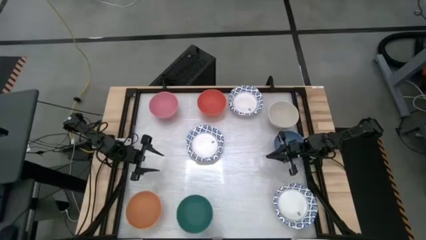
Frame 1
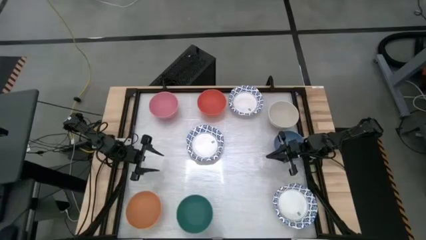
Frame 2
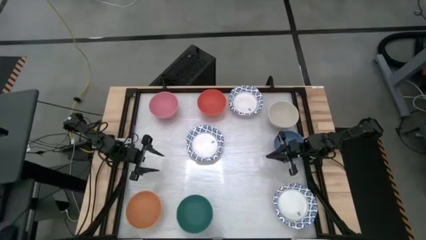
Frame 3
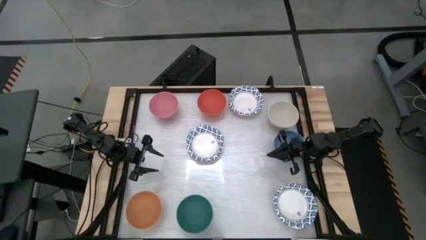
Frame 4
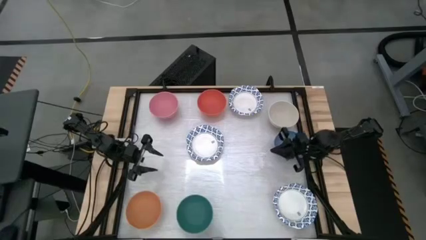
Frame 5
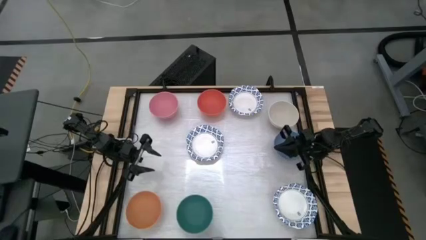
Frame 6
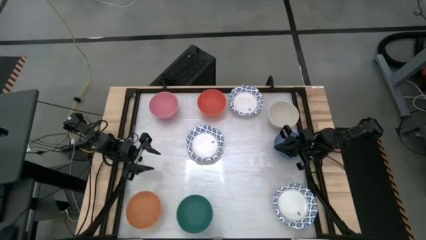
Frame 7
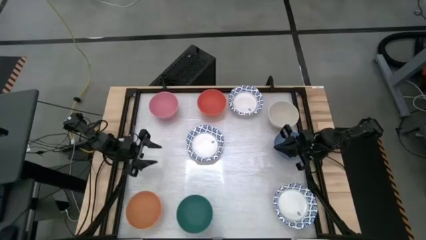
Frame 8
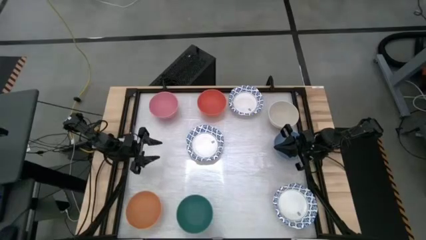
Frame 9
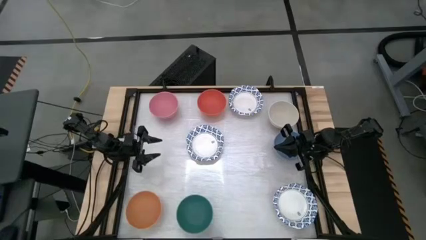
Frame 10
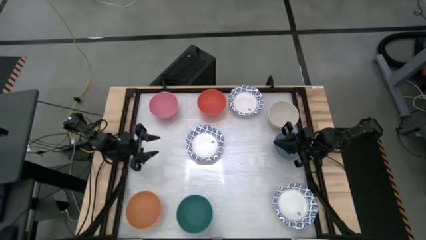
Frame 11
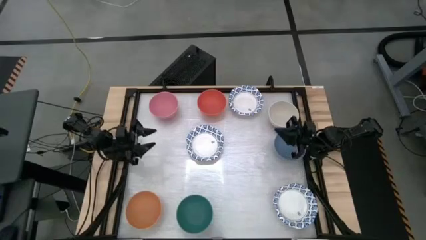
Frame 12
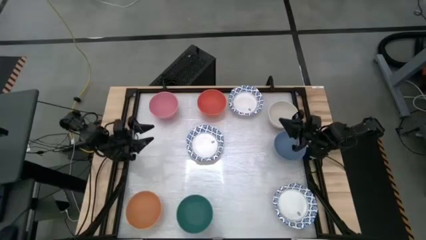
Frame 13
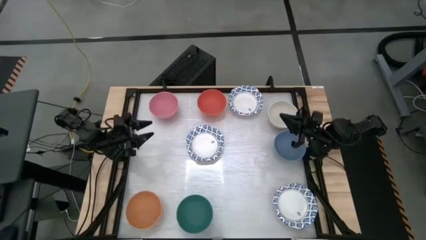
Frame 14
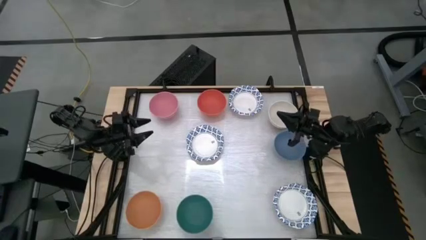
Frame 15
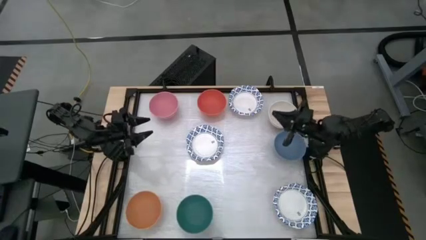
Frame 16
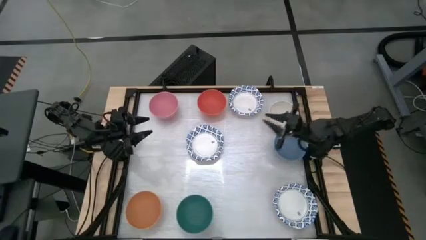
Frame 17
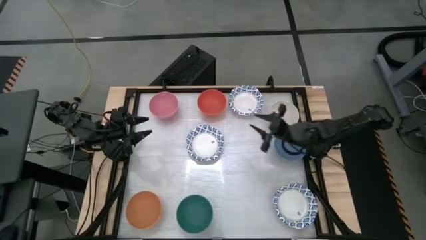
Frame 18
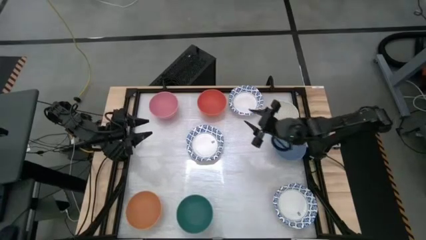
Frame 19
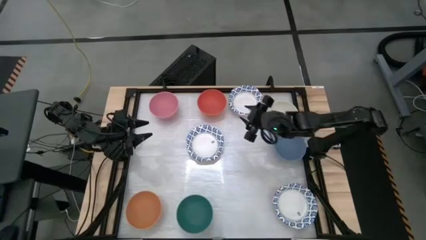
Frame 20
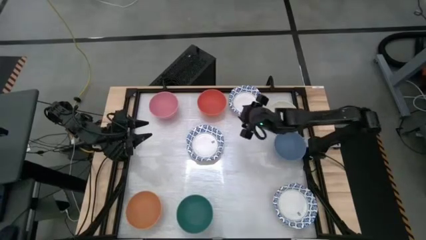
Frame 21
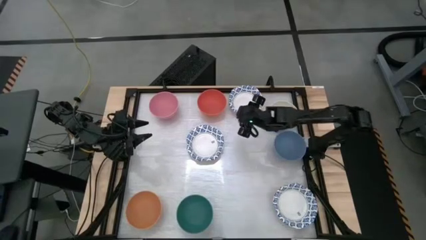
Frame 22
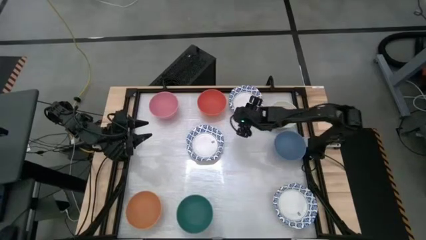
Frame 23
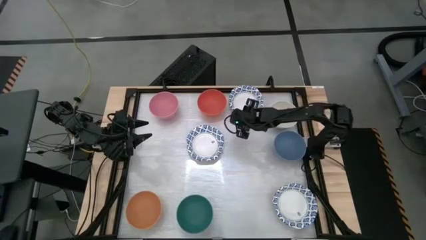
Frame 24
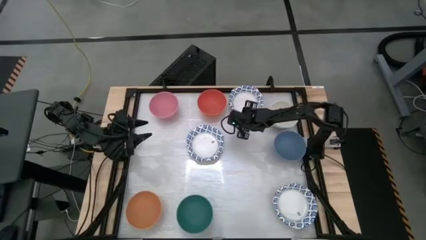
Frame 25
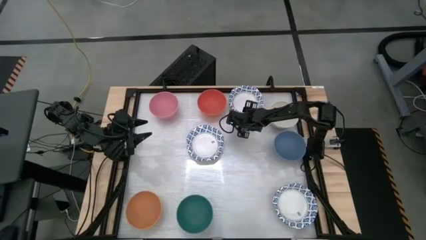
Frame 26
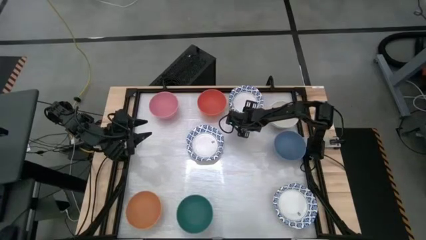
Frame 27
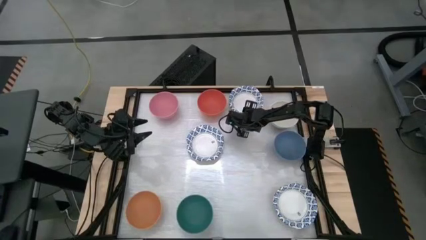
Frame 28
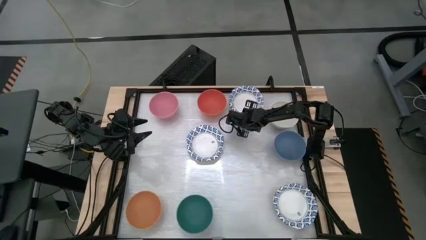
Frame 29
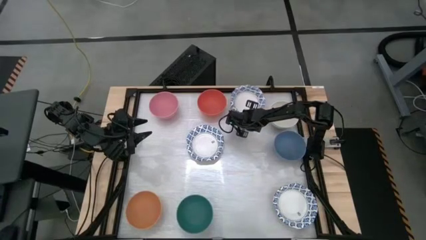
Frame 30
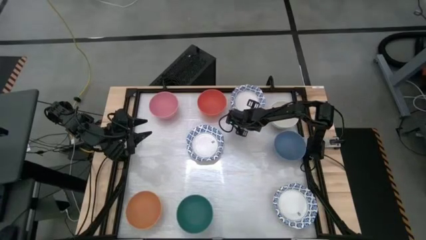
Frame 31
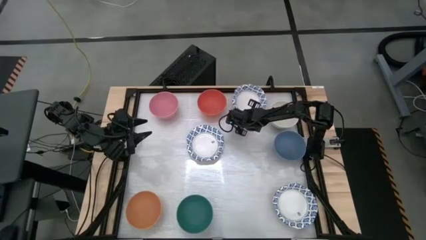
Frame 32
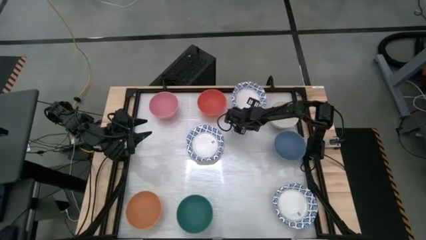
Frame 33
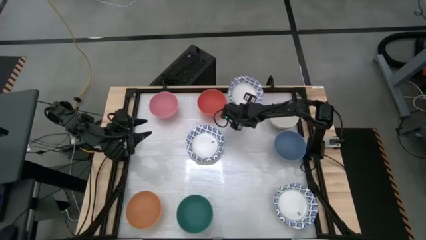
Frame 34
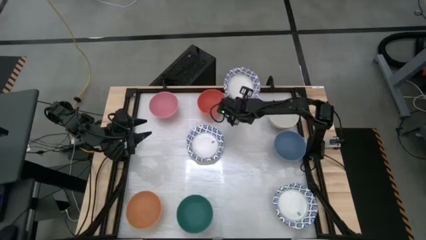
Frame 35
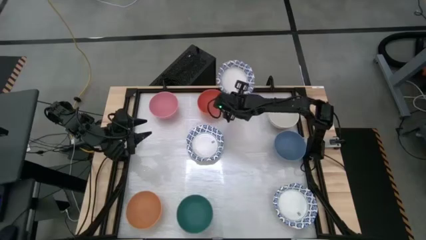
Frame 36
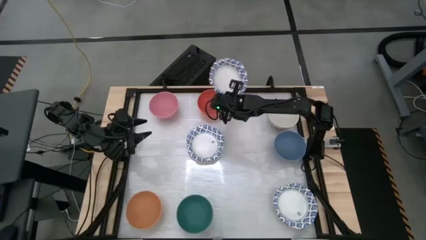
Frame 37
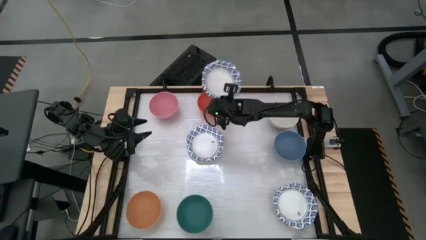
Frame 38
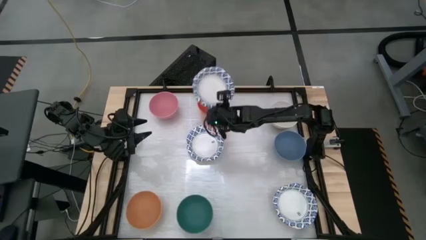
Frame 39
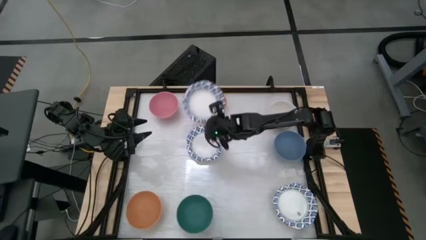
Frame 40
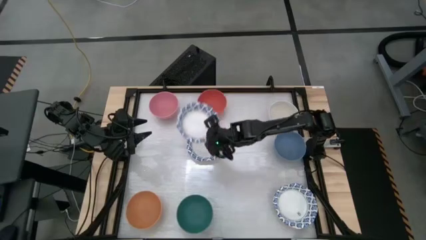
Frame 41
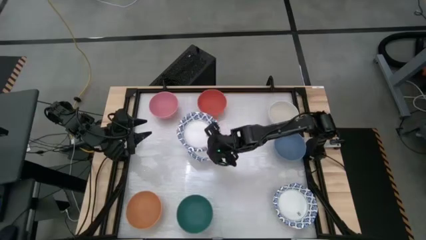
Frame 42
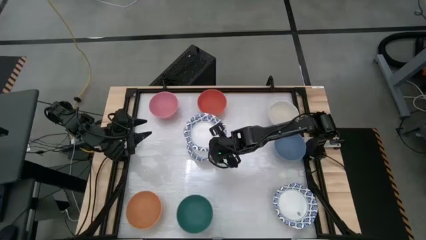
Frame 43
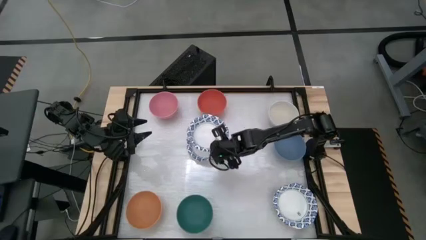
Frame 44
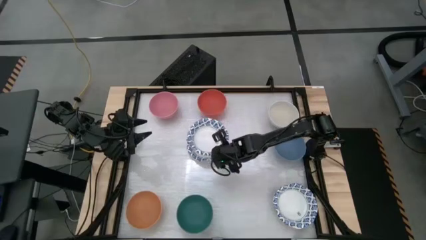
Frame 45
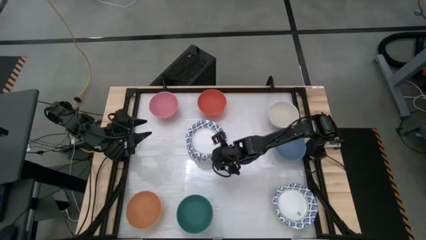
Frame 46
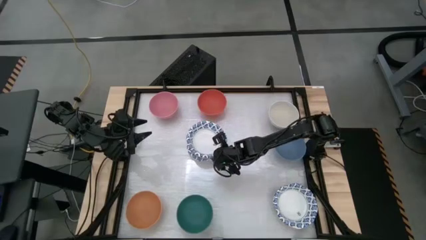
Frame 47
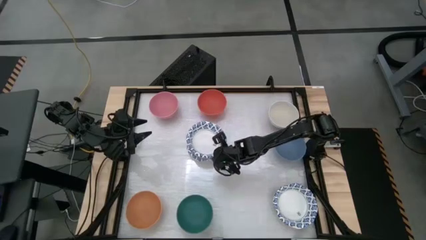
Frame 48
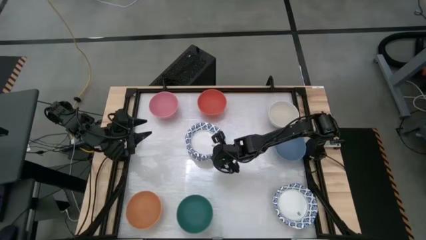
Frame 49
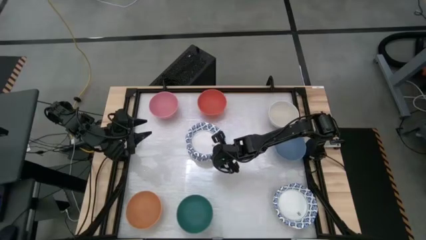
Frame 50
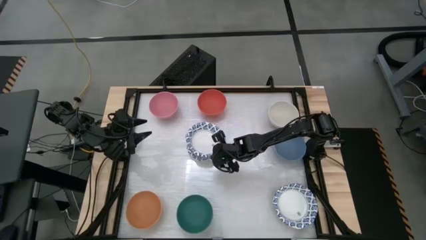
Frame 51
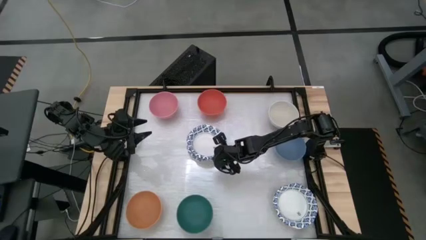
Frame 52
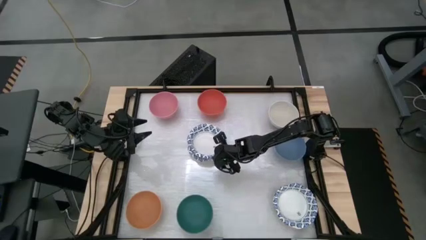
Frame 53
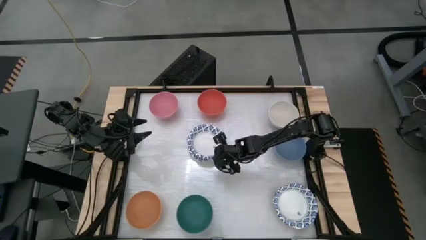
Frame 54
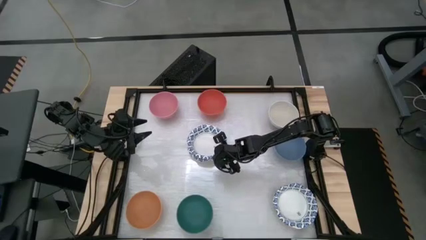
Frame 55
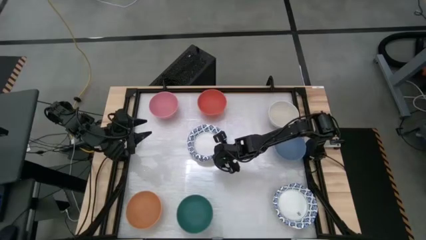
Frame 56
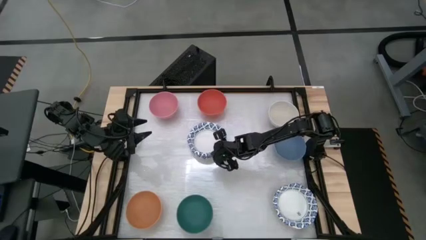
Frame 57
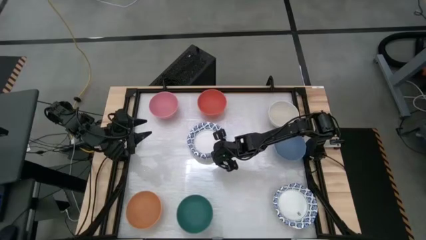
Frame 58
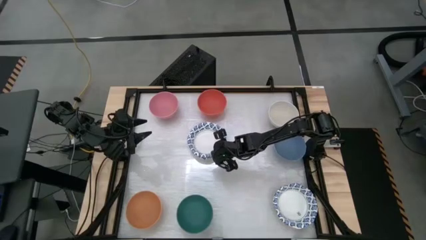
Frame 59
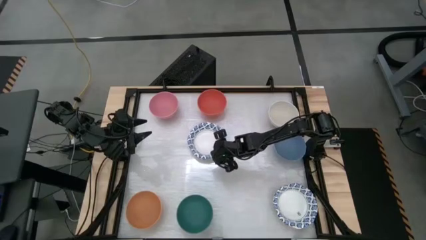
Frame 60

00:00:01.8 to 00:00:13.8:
Stack the top blue white patterned bowl on top of the middle blue white patterned bowl
